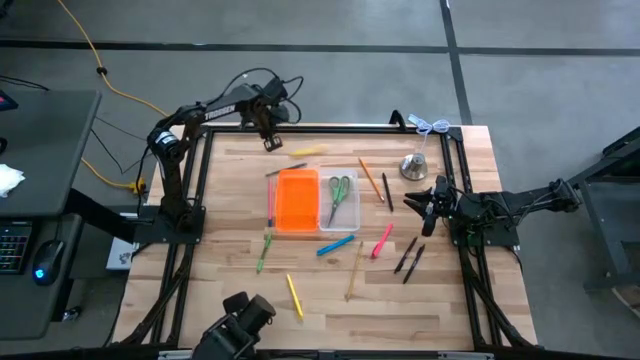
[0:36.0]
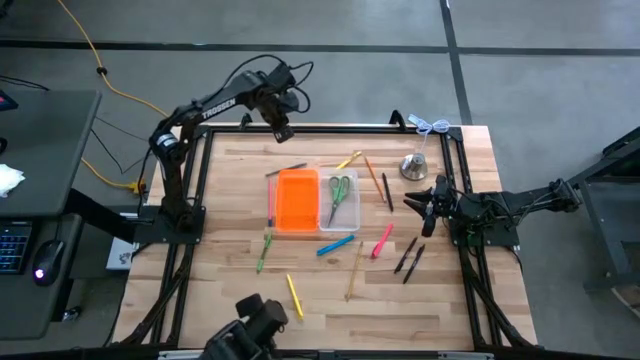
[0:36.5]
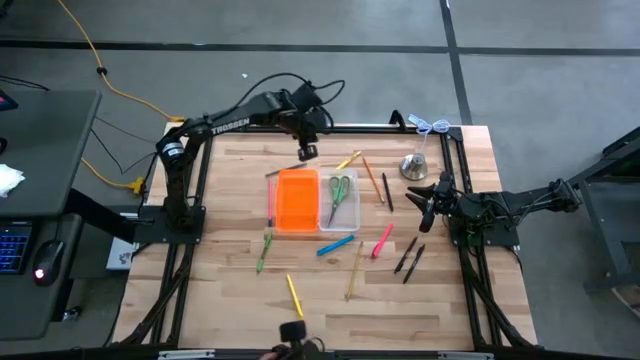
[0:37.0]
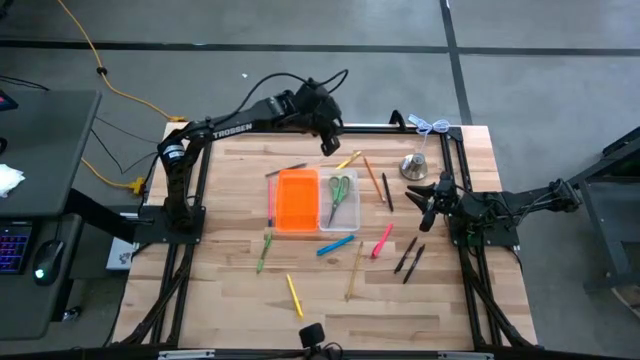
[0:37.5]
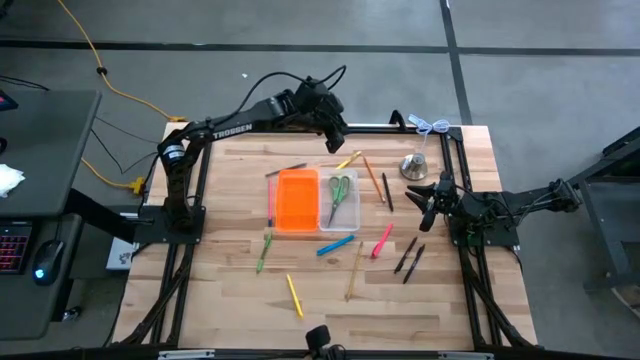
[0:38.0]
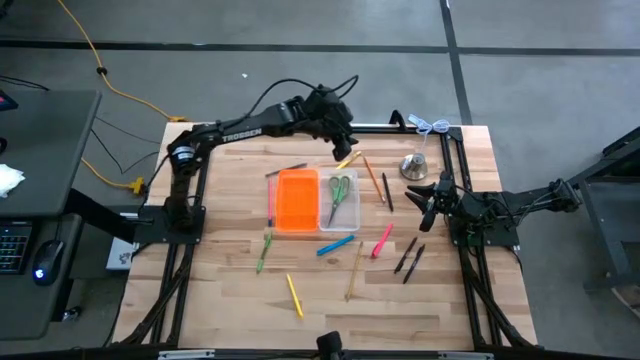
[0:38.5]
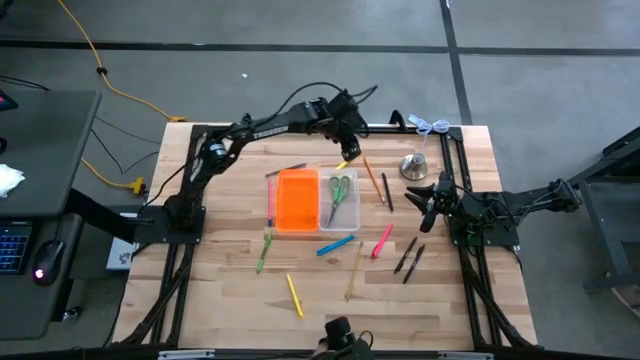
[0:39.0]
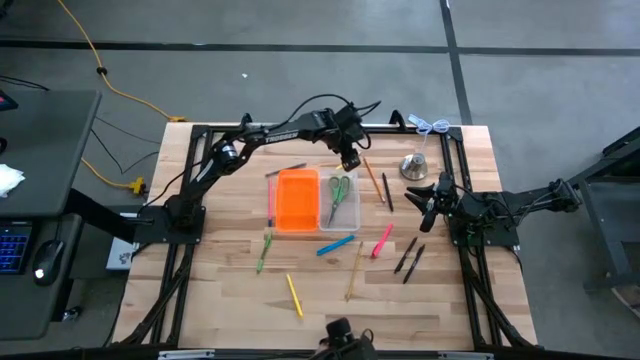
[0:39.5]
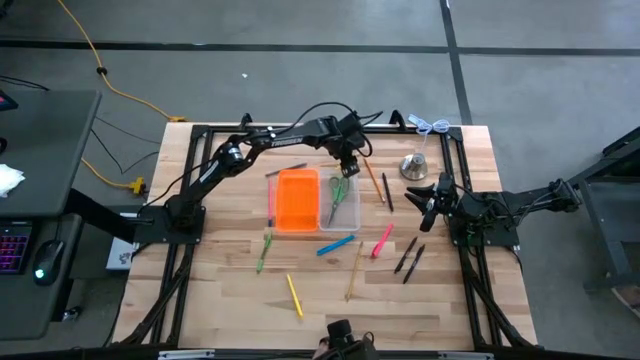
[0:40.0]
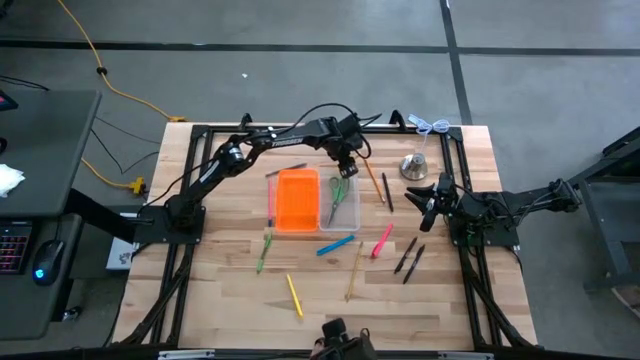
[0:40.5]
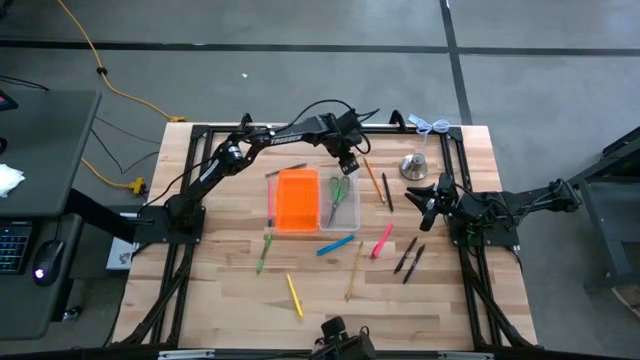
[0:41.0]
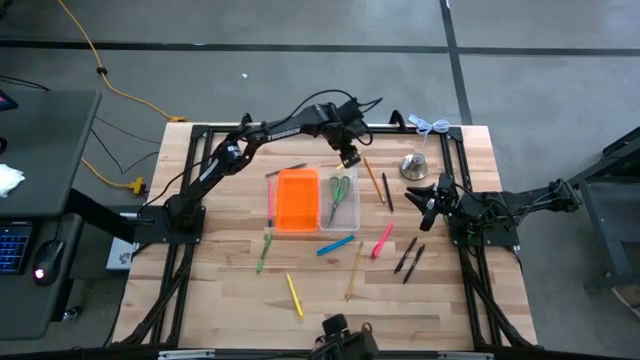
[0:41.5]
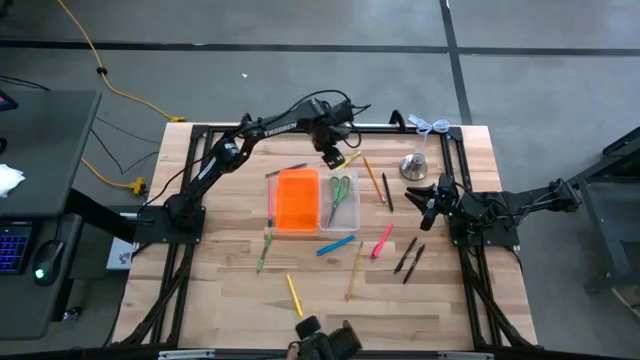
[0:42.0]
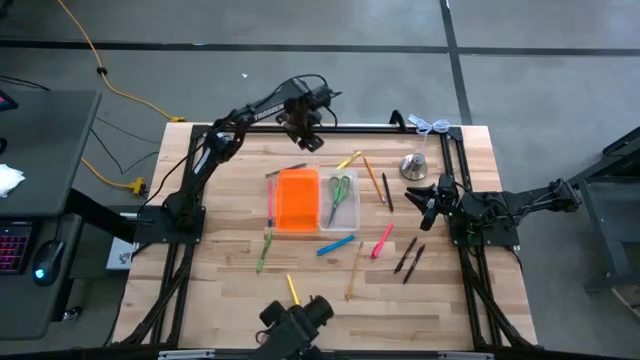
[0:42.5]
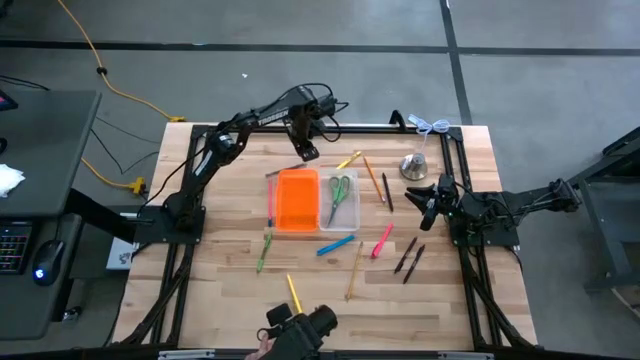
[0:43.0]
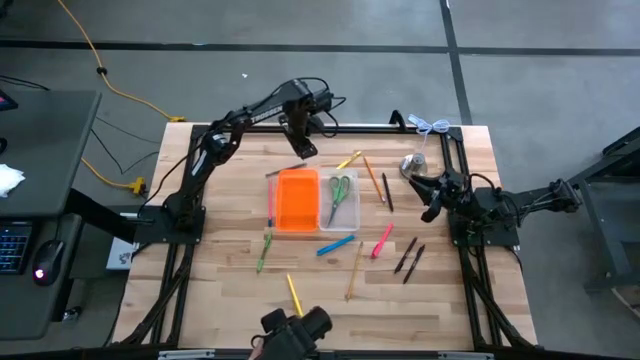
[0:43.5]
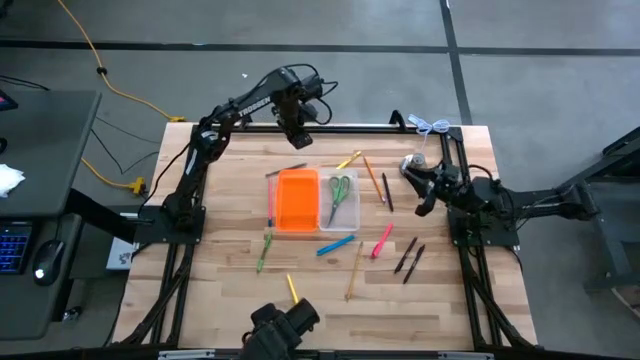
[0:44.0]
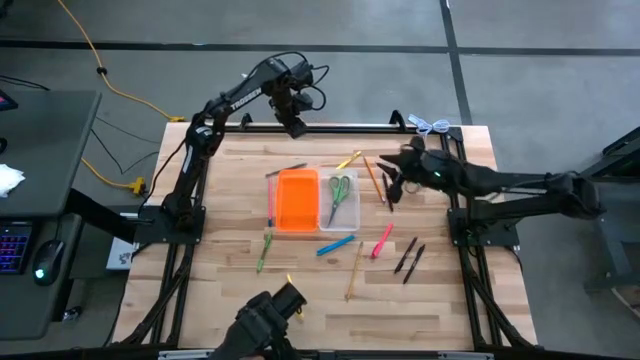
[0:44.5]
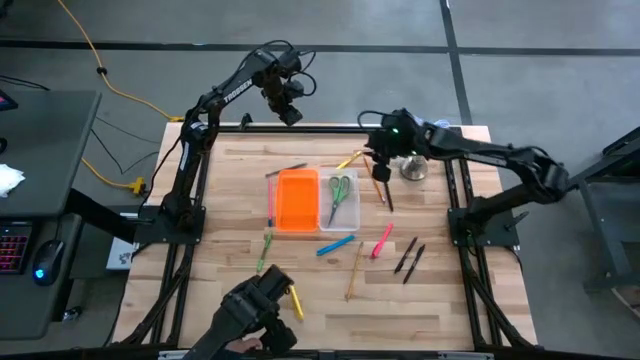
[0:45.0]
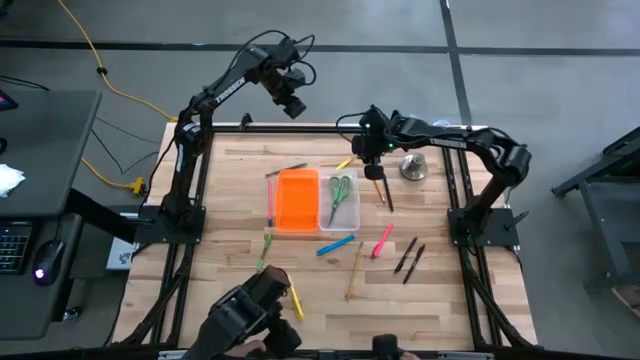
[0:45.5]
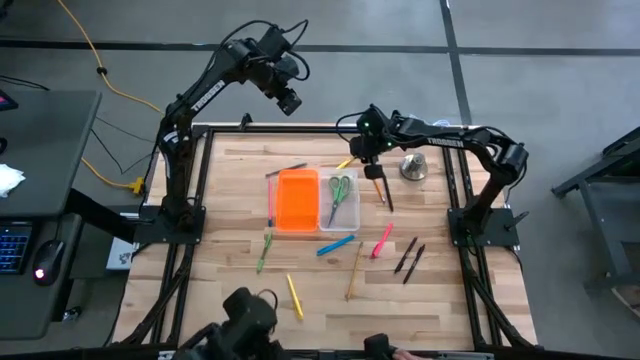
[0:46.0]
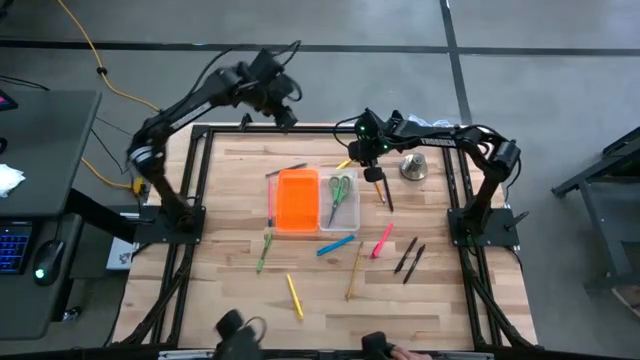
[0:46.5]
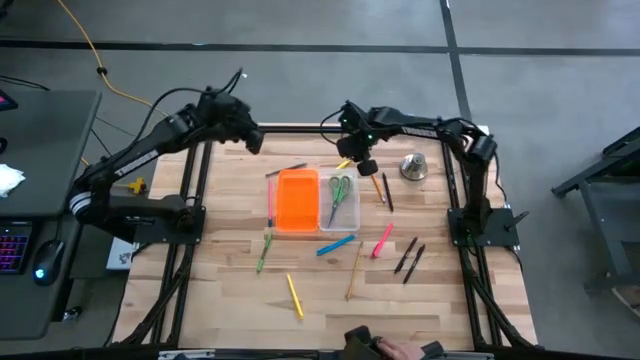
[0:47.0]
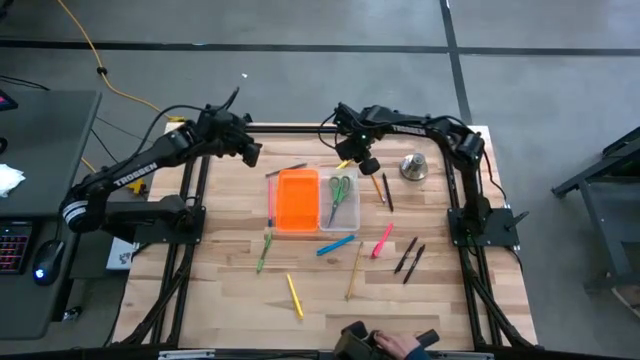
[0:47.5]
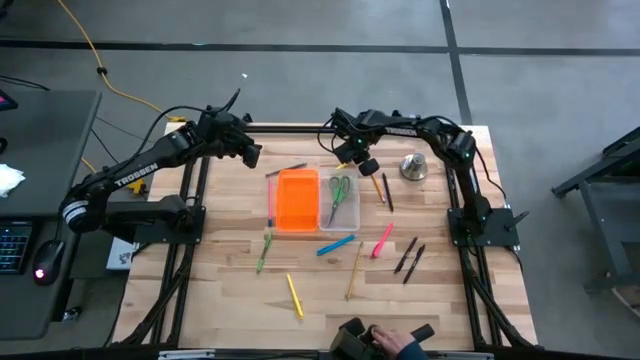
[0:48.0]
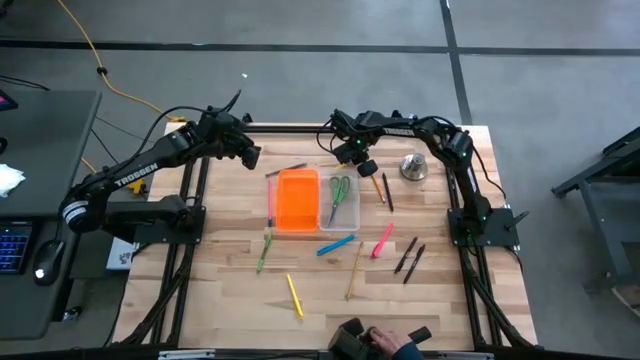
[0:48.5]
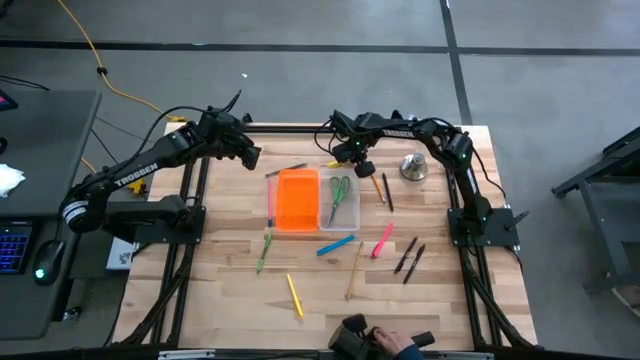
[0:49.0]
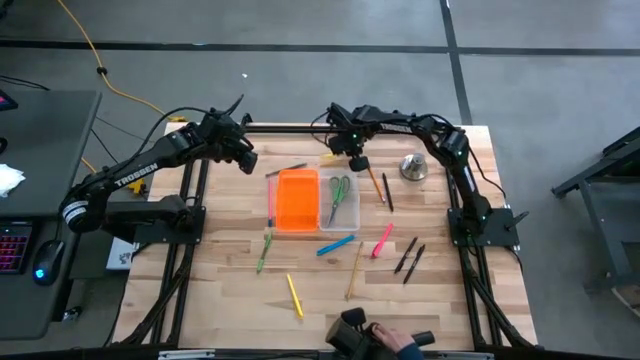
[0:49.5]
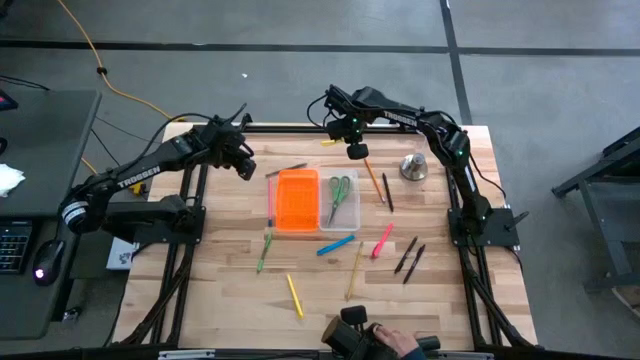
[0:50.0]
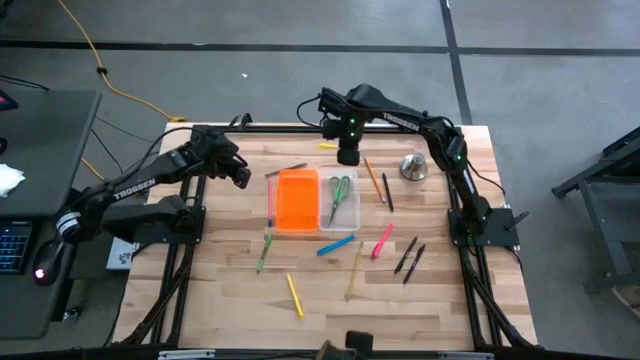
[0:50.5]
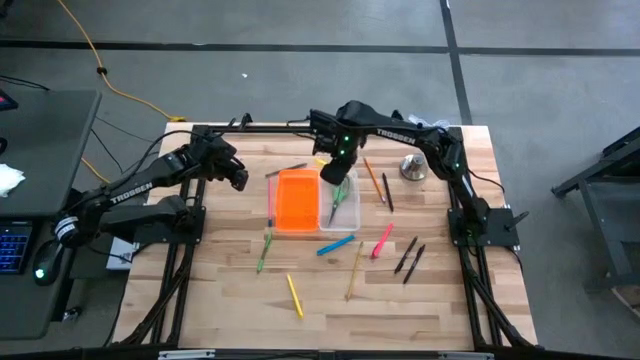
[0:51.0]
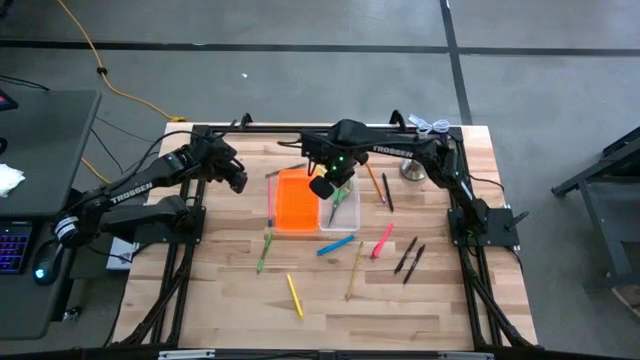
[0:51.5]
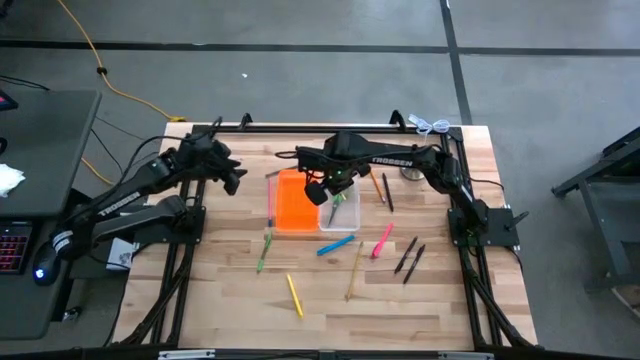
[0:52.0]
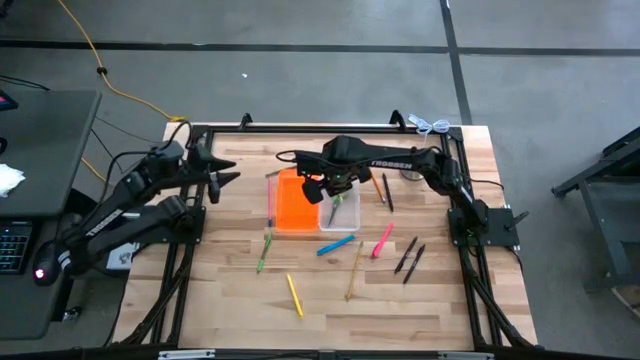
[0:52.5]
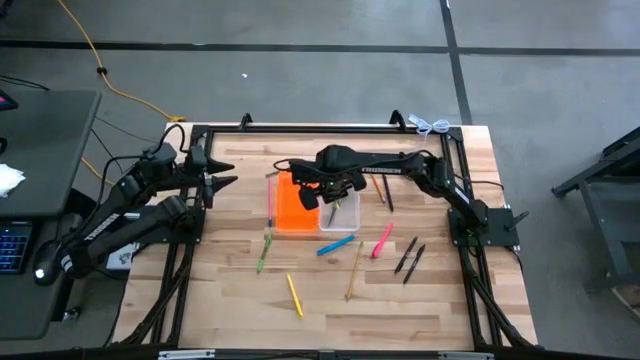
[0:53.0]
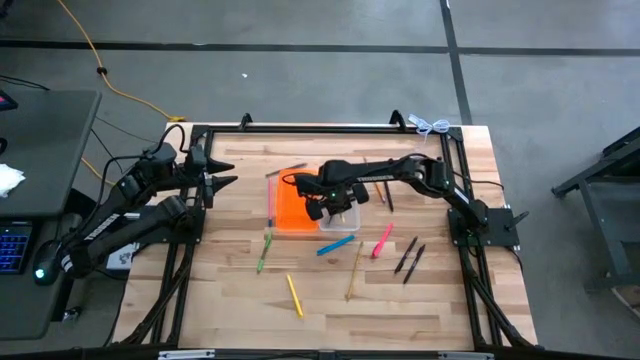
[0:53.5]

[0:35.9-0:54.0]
Task: Pick & place school supplies into a supply box
Put the yellow pen into the supply box

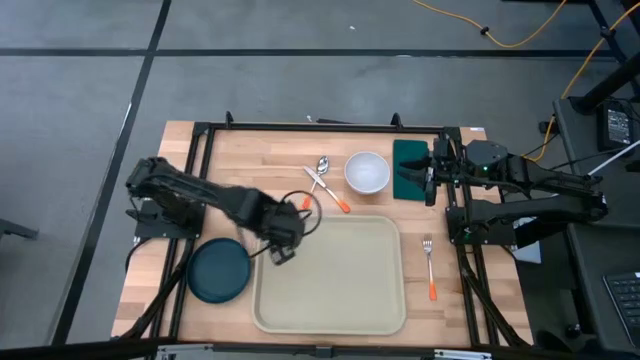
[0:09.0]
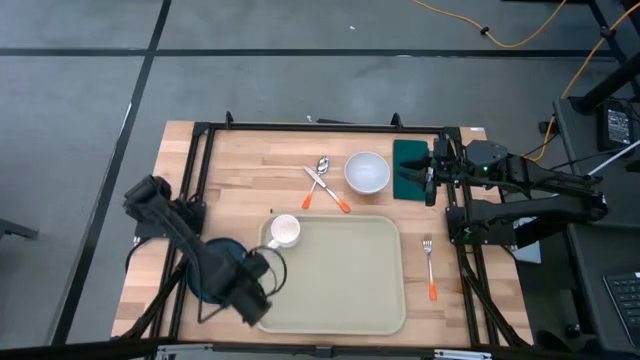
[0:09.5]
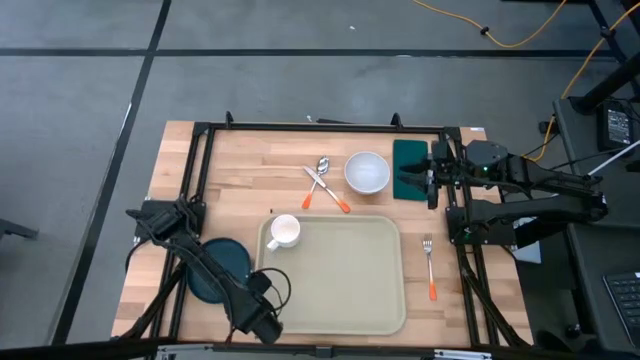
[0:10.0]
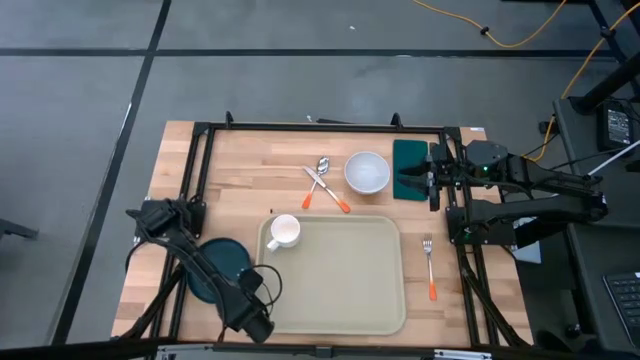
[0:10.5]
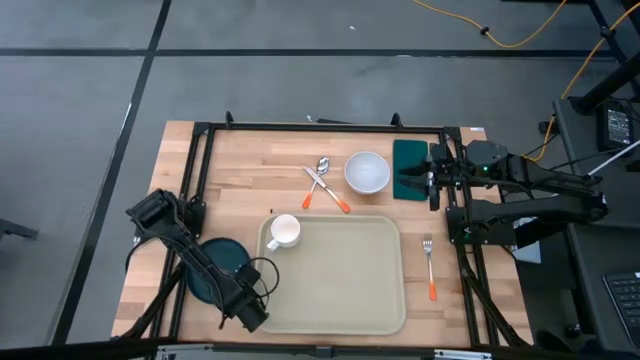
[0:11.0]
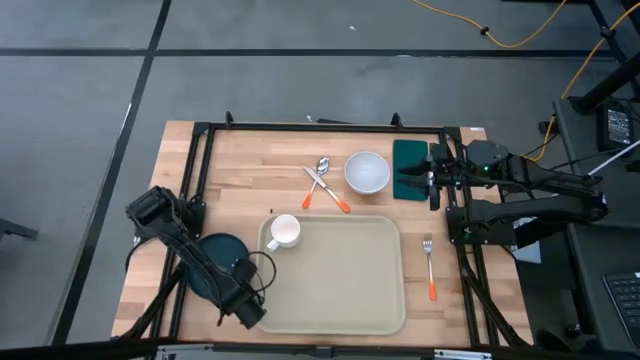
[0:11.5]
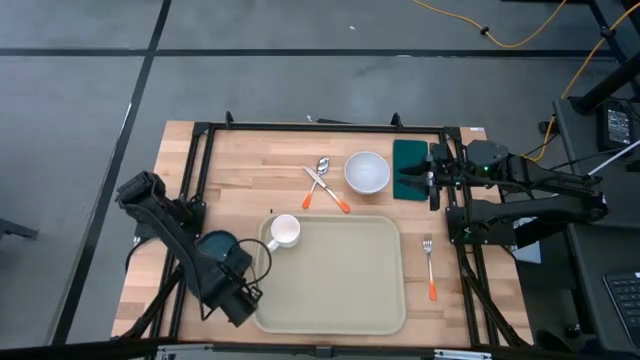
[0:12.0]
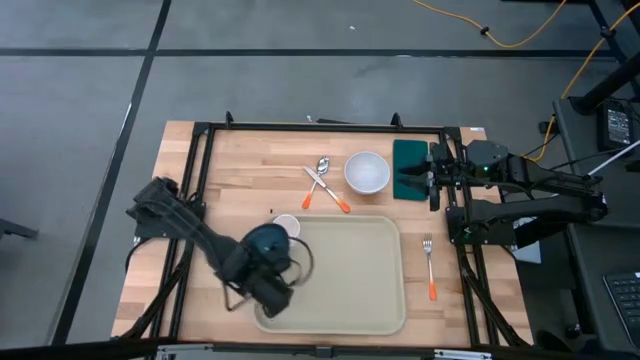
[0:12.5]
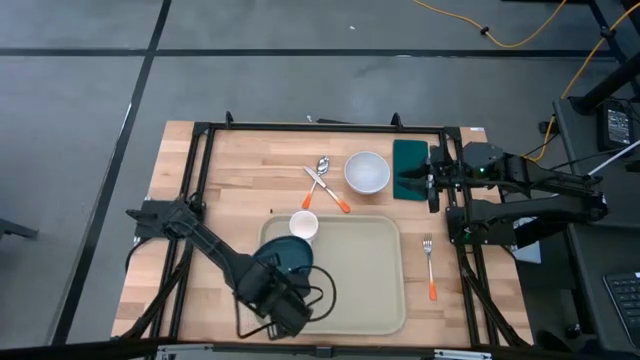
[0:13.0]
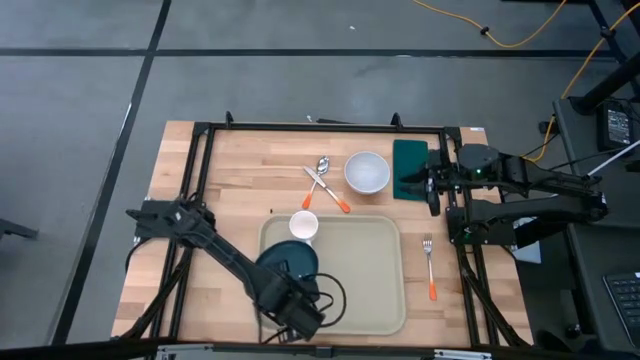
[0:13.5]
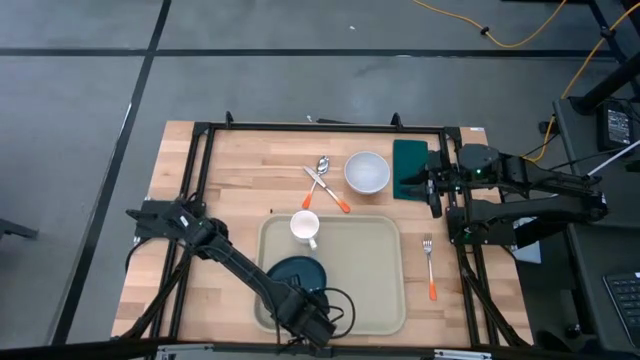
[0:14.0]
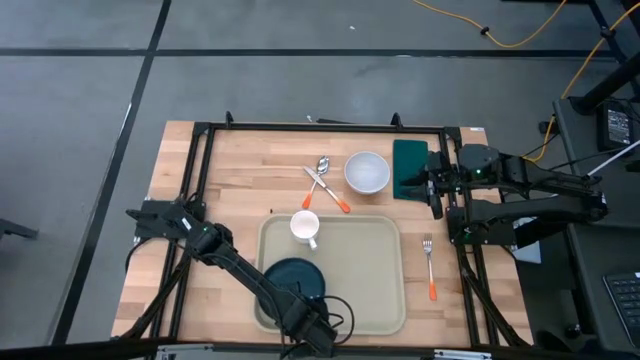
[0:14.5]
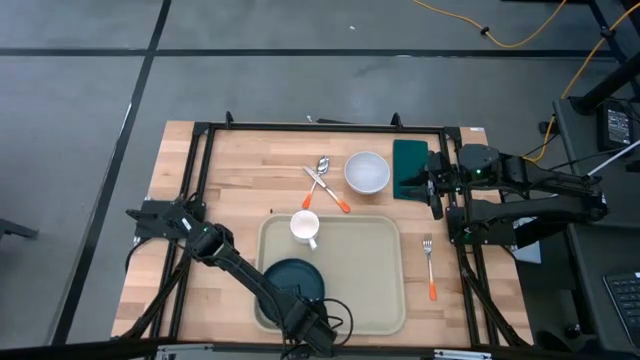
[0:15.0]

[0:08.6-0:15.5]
Task: Set up tray
Put the black plate on the light brown serving tray to the bottom of the white cup
